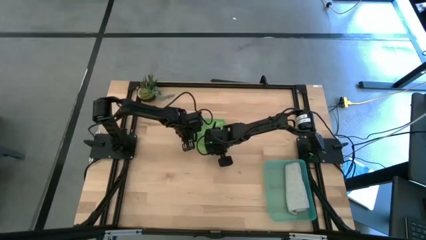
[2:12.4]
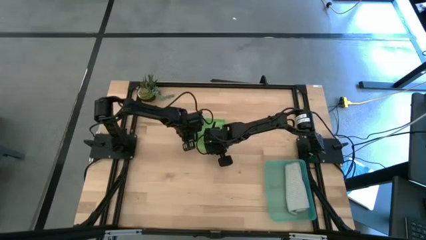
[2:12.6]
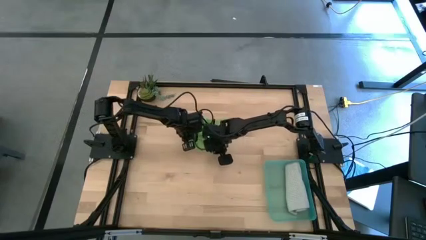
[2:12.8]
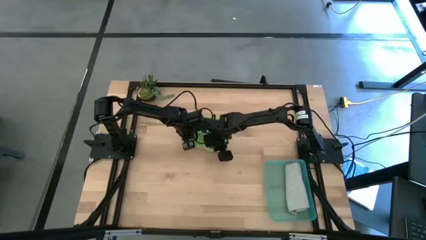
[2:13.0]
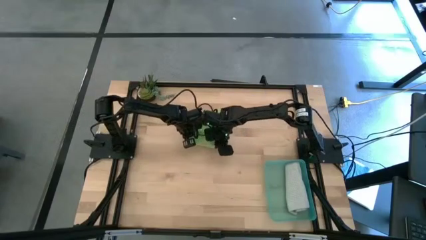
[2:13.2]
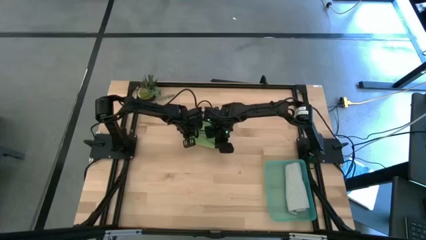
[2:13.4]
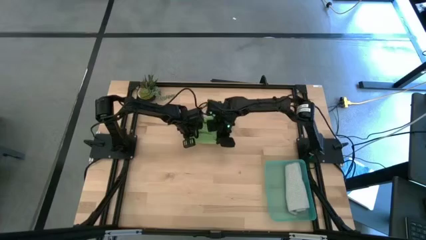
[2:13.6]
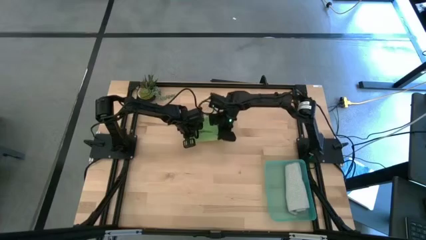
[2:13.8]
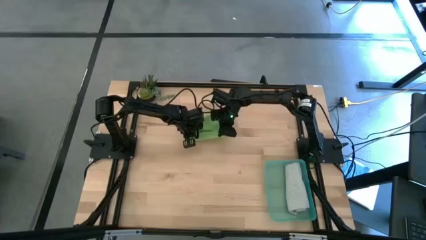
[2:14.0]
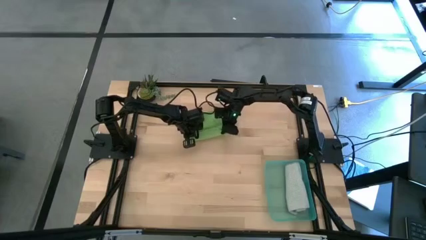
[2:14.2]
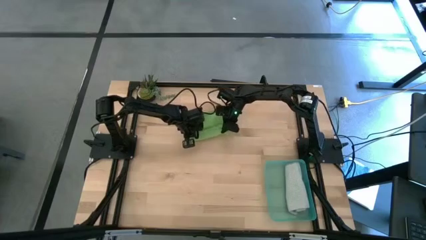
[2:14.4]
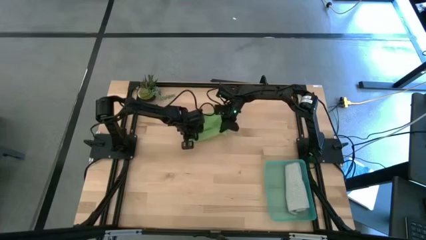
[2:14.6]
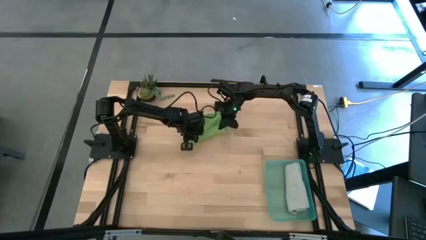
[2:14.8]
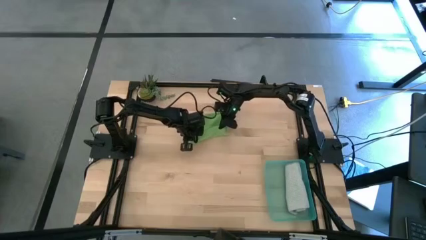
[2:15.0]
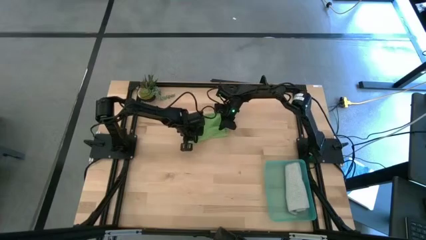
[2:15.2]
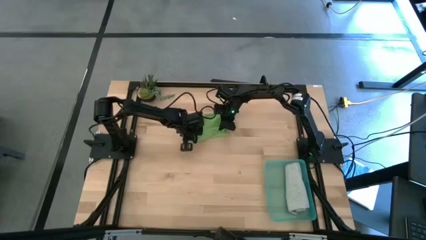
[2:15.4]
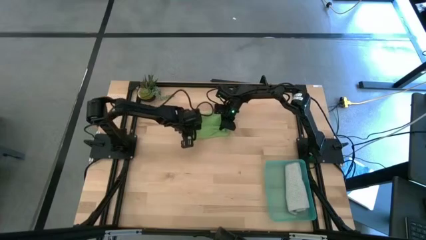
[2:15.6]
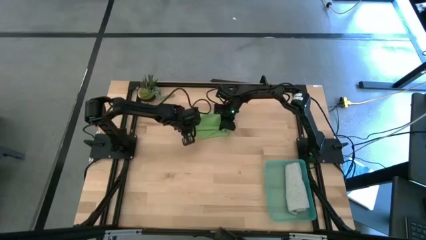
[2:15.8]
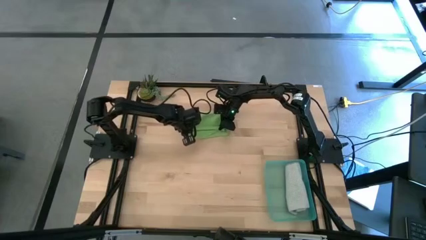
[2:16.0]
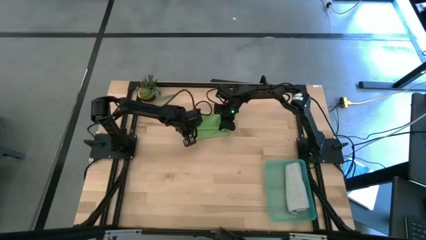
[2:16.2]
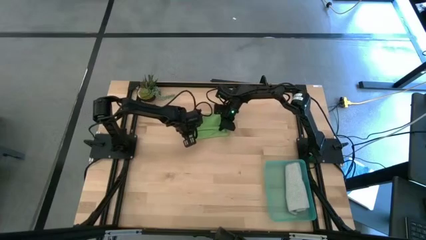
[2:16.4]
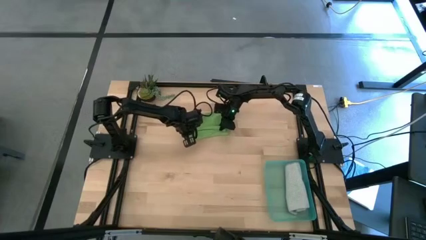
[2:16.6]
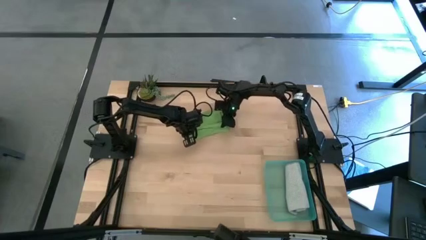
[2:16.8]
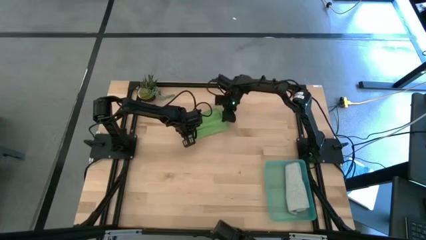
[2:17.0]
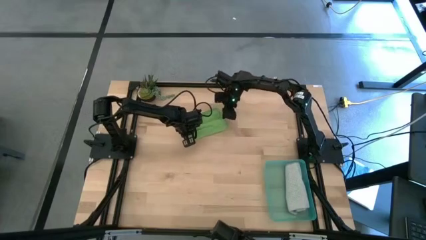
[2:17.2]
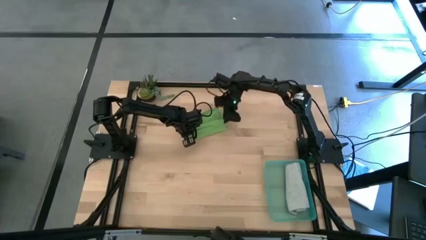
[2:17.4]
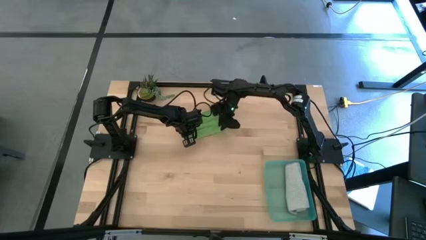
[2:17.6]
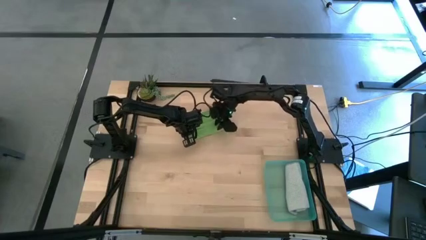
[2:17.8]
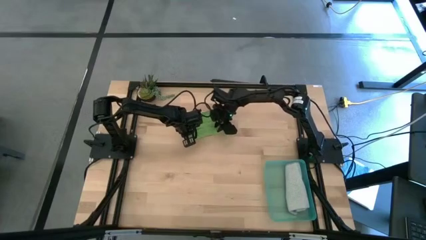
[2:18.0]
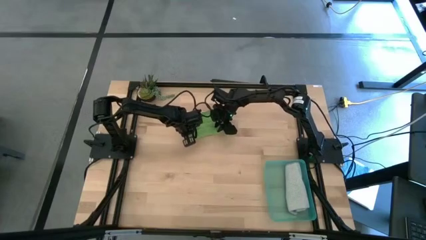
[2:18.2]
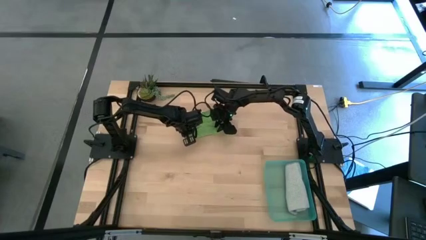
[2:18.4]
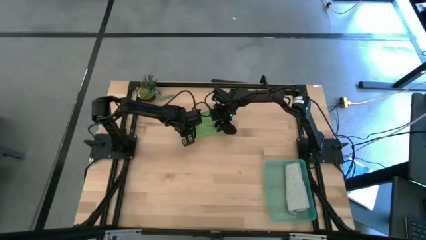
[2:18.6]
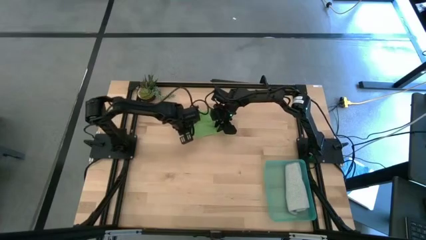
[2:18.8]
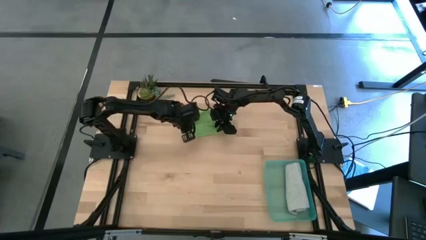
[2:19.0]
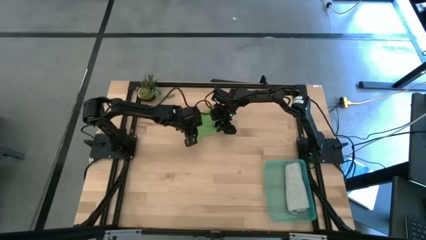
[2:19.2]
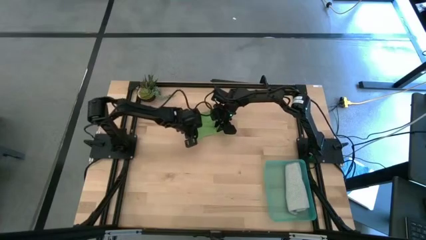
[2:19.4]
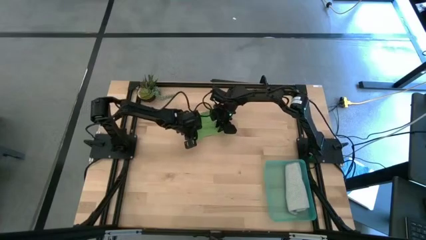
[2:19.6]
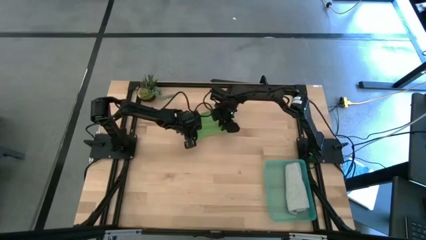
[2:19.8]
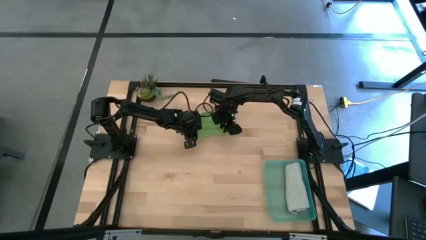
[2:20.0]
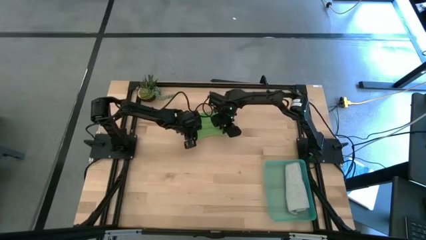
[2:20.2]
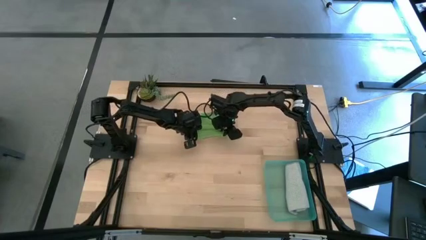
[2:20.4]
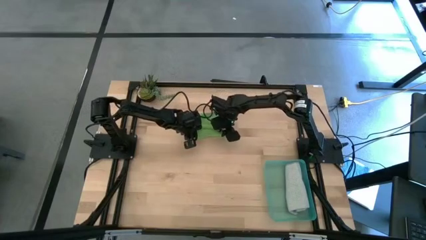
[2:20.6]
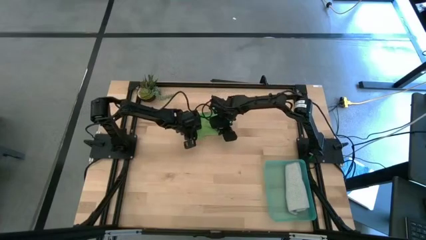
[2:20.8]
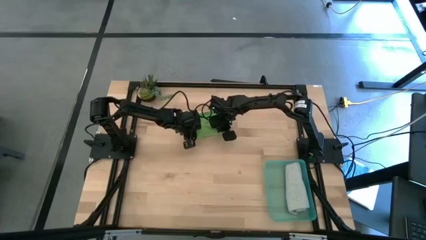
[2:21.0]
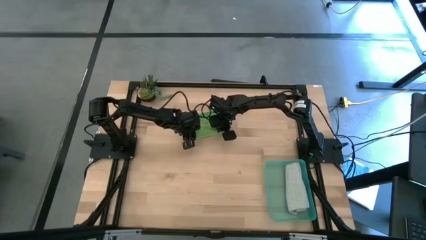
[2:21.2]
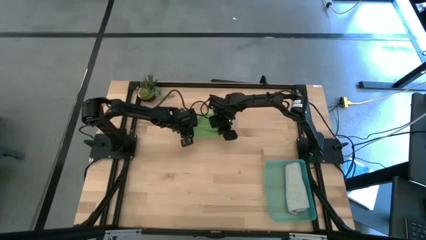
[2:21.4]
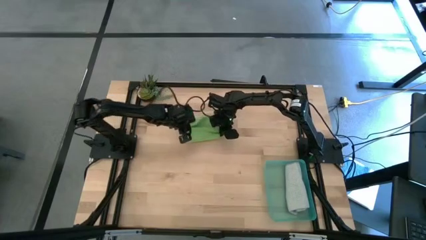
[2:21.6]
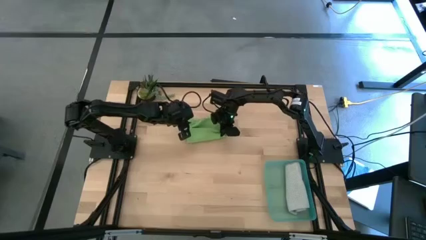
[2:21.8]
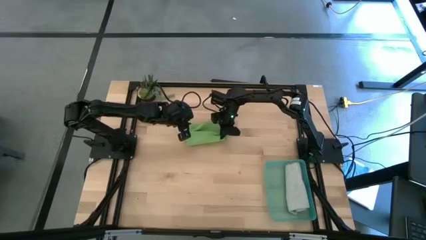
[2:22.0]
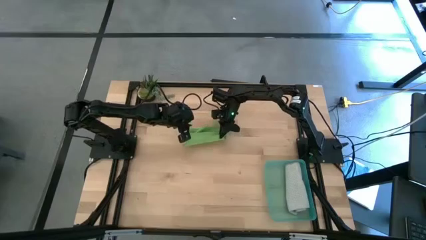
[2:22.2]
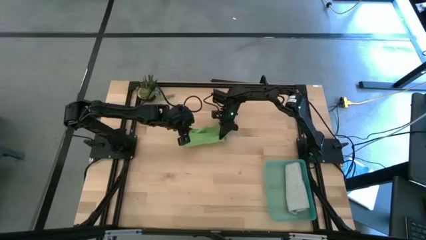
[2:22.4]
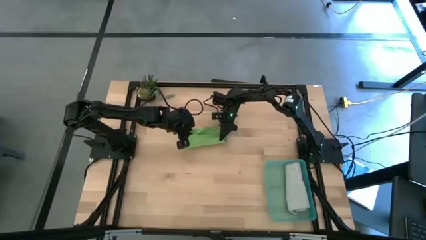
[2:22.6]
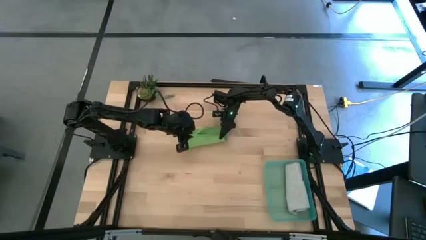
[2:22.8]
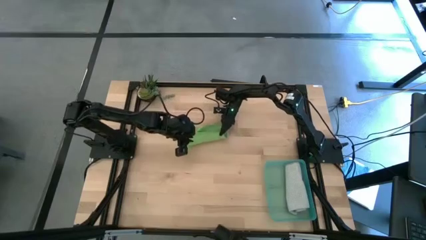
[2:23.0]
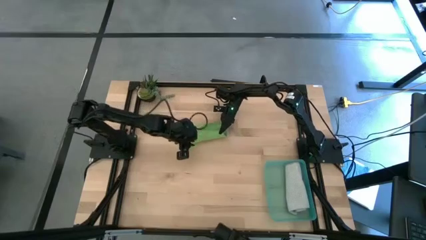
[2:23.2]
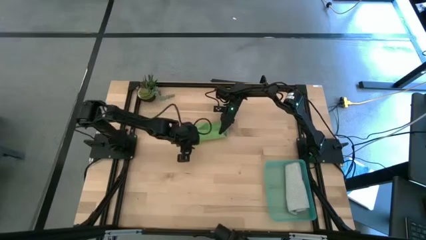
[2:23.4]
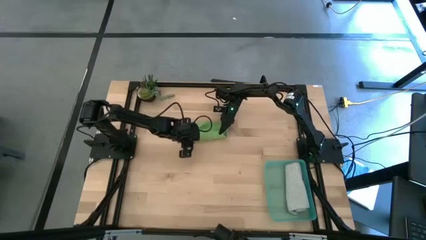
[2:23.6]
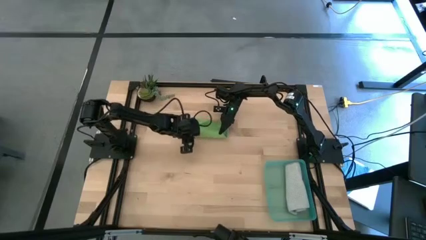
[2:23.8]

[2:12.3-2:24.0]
Task: Roll microfiber towels into tight, uniform cylinder then place into a basket
Roll the green microfiber towel

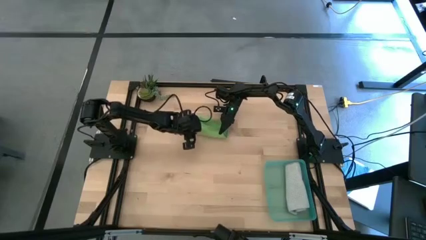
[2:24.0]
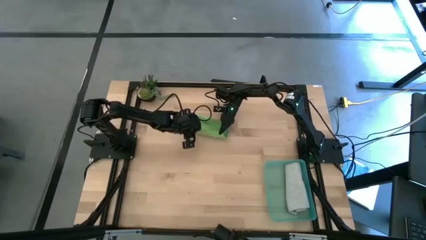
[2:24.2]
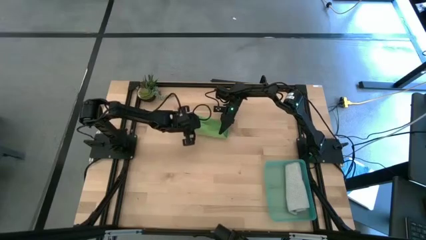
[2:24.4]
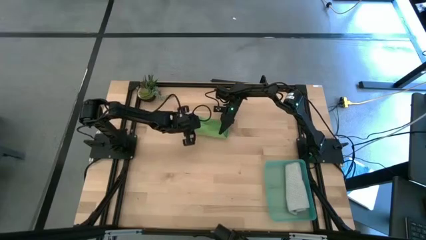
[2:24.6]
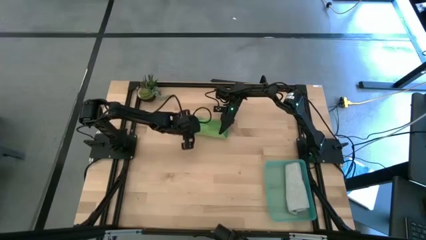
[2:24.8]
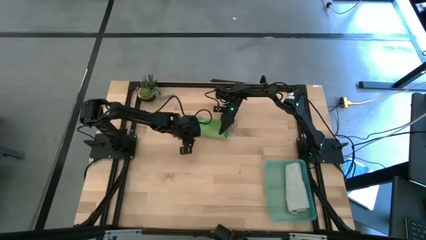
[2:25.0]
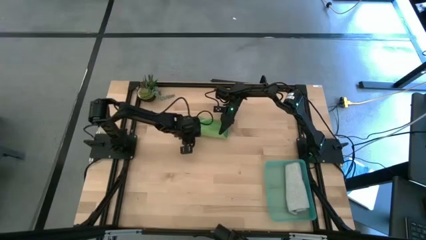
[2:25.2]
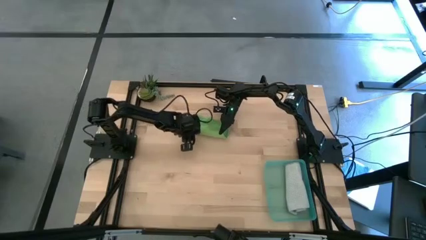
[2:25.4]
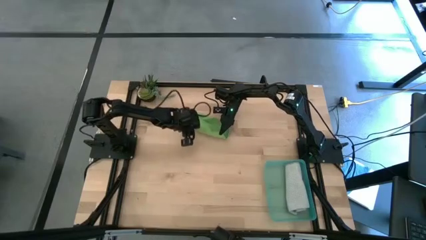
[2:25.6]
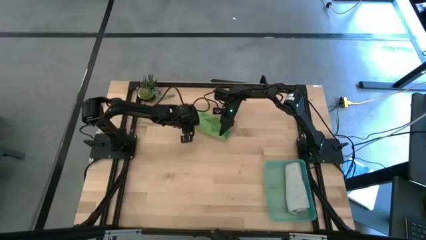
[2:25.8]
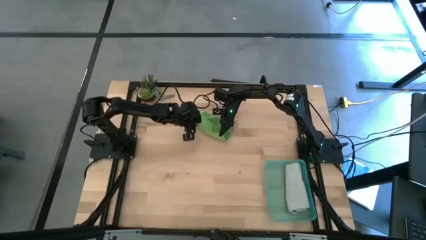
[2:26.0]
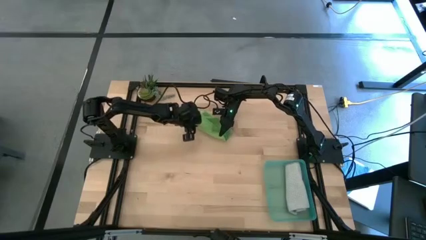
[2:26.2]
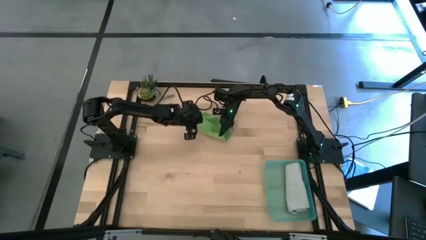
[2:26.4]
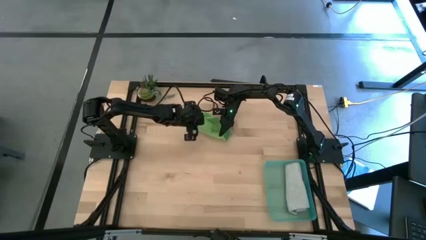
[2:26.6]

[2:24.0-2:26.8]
Roll the green microfiber towel

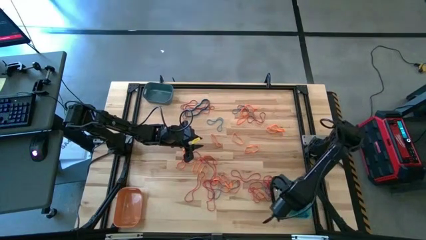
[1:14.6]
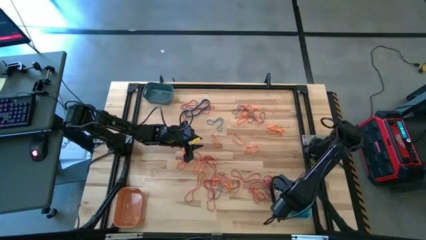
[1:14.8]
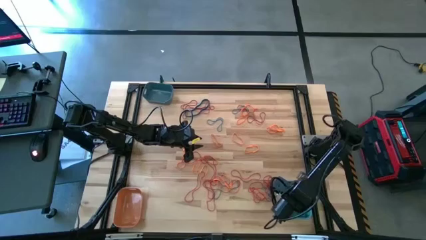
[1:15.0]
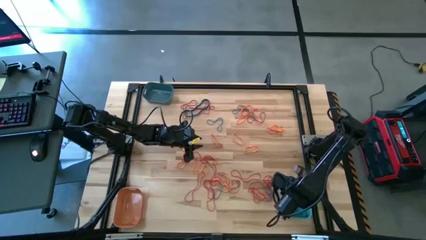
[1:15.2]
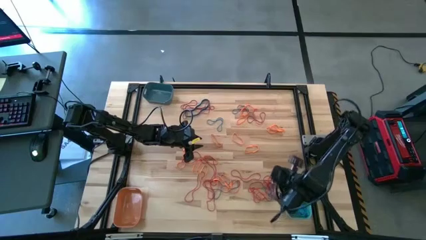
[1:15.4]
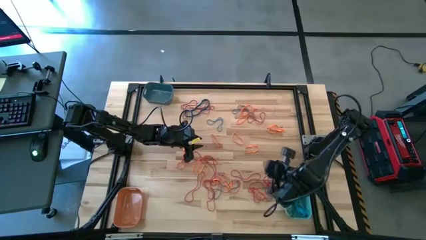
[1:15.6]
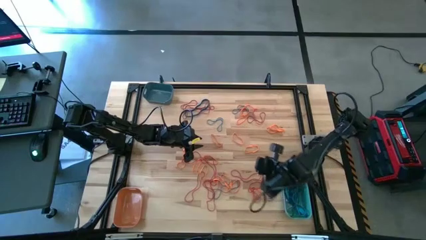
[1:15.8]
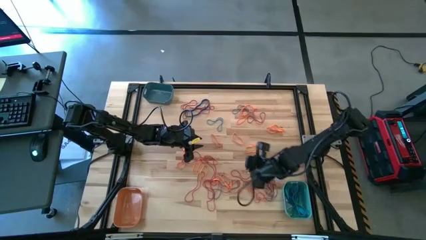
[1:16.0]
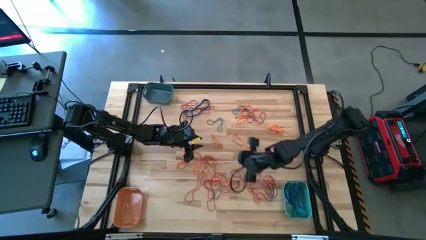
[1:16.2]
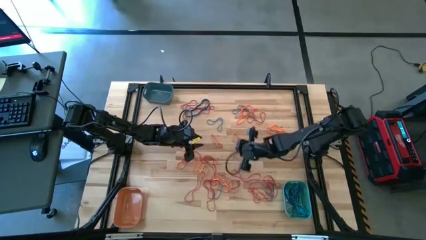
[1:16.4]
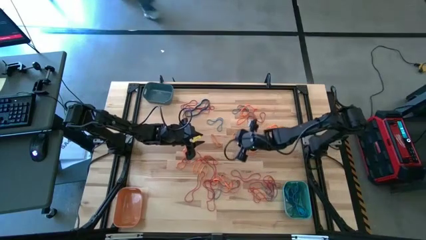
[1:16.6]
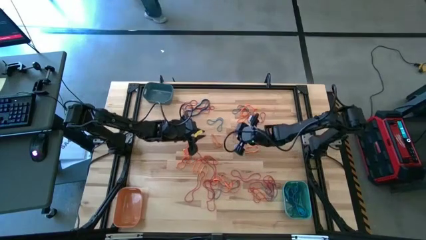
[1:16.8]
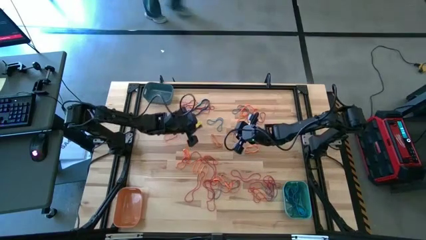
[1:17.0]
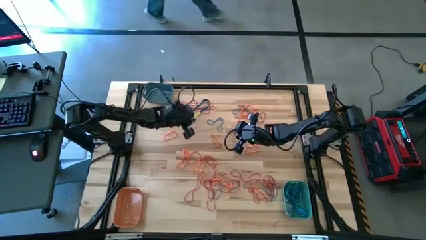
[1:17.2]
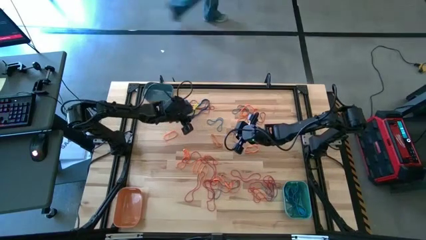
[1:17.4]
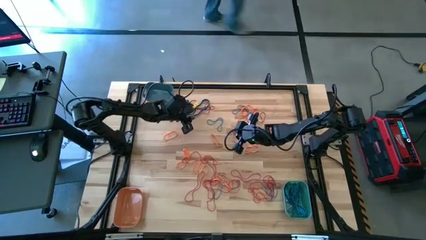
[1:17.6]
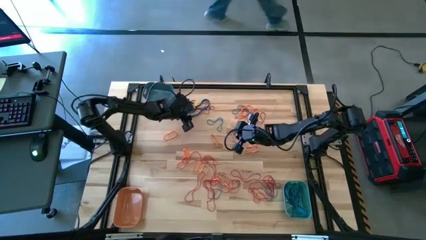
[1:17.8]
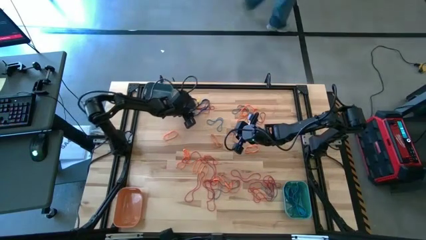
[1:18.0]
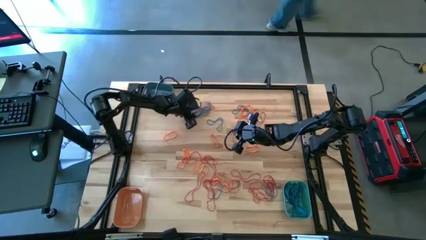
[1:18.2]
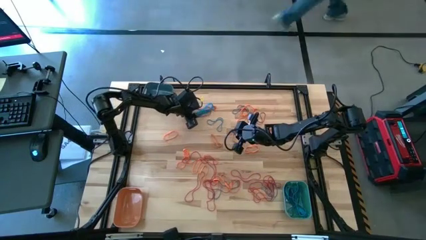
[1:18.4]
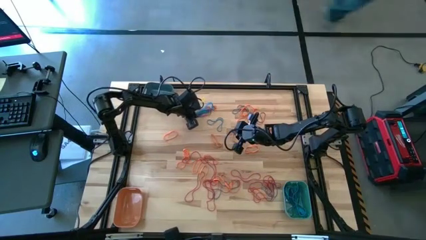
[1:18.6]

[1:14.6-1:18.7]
Task: Sort rubber bands into baskets
Put the blue rubber band into the light blue bin
